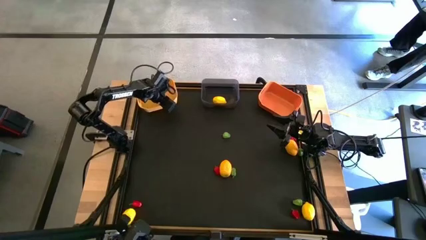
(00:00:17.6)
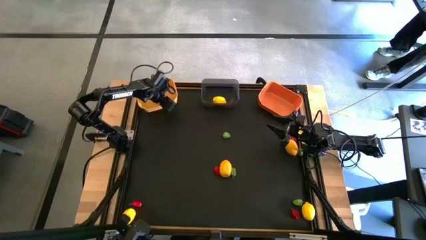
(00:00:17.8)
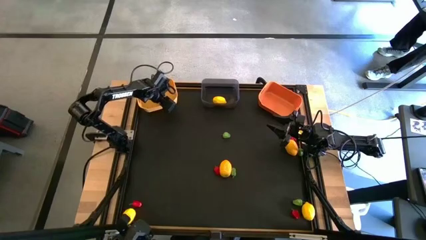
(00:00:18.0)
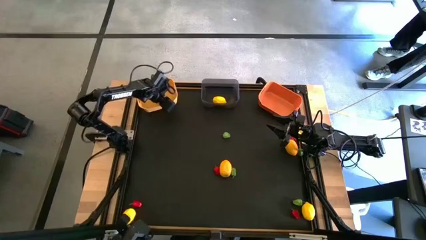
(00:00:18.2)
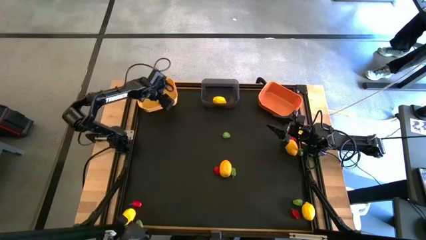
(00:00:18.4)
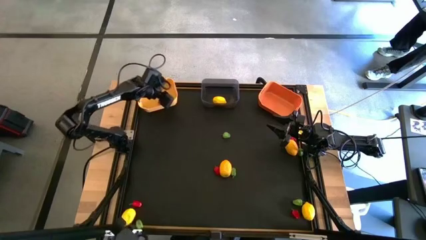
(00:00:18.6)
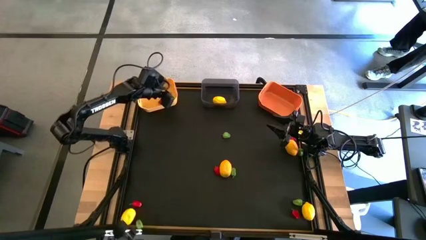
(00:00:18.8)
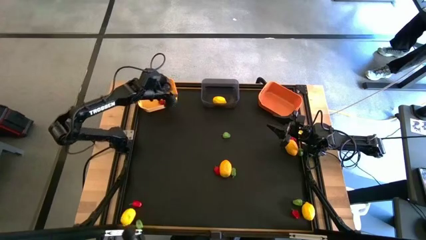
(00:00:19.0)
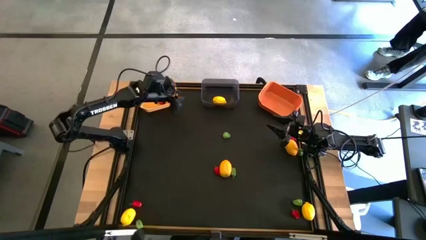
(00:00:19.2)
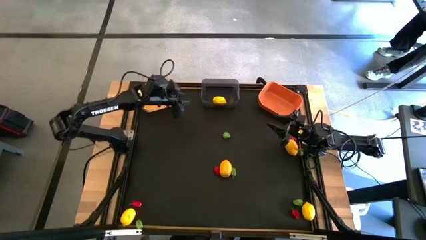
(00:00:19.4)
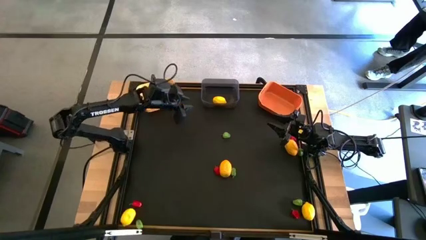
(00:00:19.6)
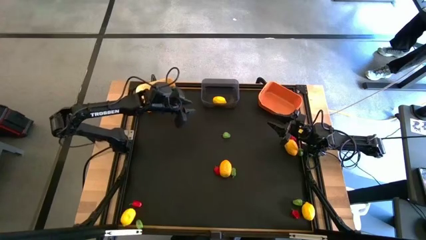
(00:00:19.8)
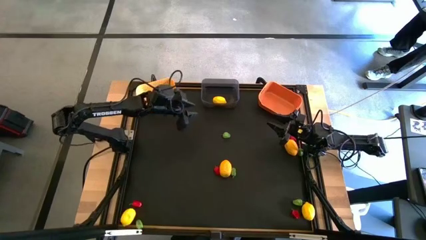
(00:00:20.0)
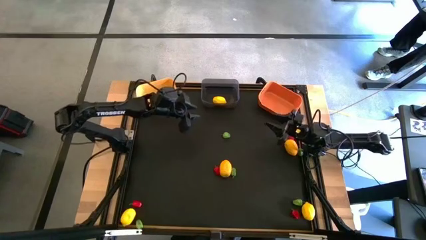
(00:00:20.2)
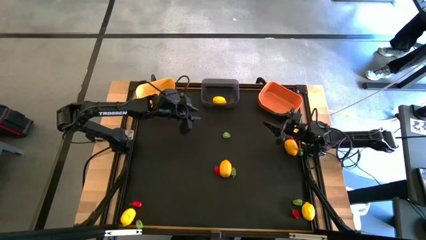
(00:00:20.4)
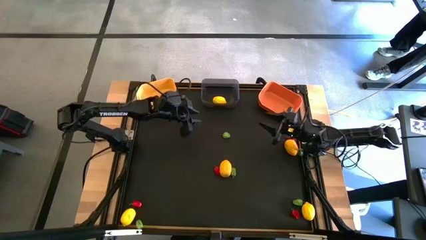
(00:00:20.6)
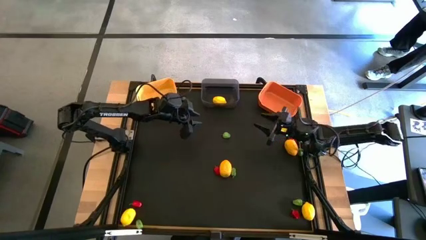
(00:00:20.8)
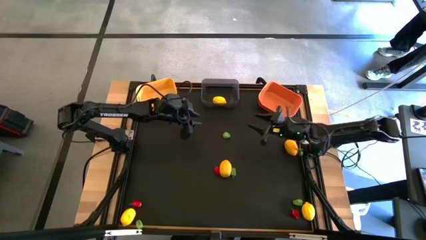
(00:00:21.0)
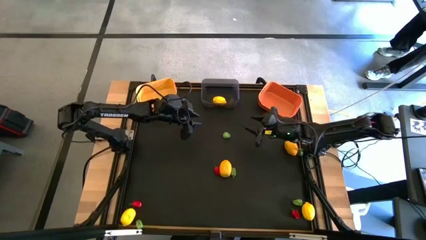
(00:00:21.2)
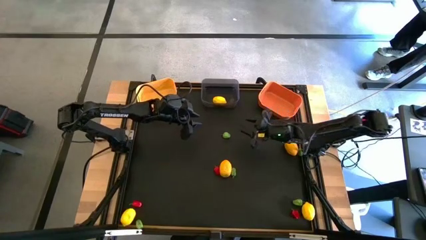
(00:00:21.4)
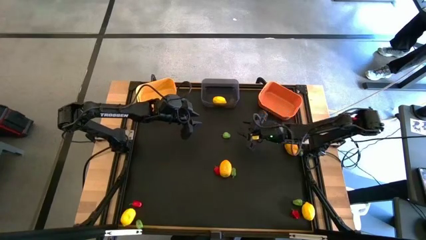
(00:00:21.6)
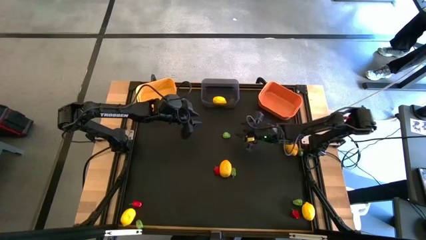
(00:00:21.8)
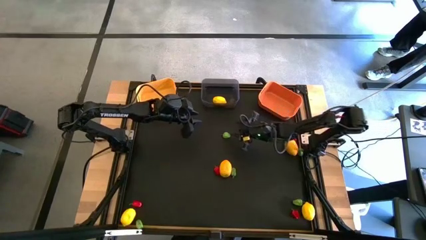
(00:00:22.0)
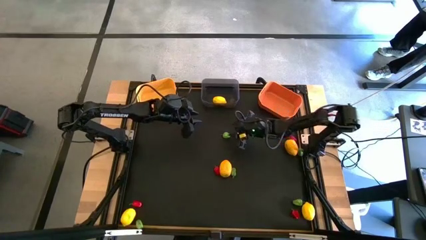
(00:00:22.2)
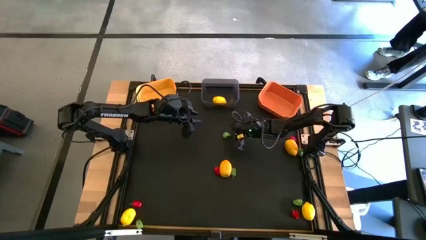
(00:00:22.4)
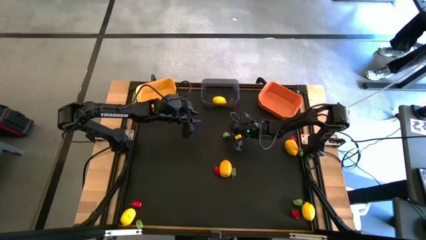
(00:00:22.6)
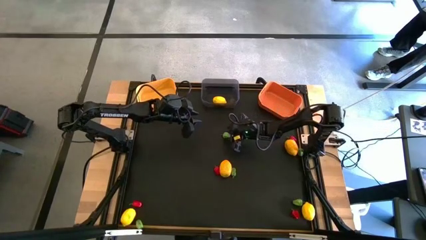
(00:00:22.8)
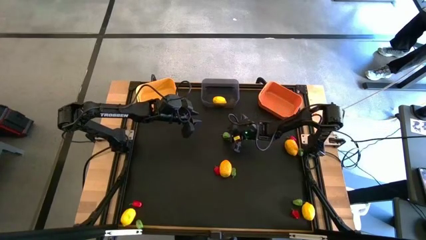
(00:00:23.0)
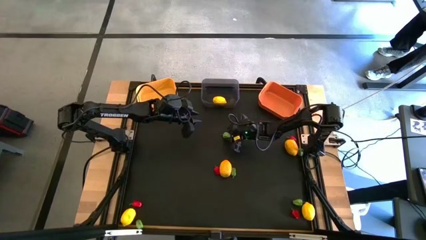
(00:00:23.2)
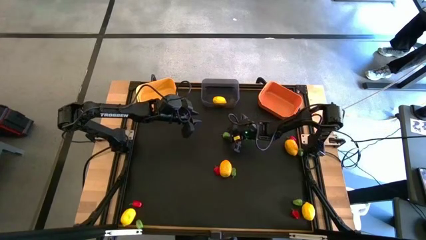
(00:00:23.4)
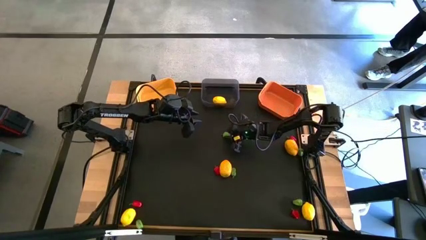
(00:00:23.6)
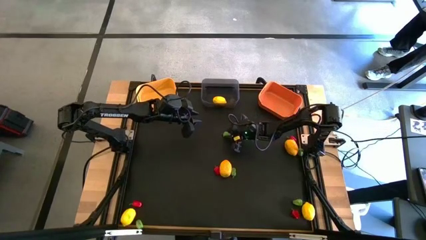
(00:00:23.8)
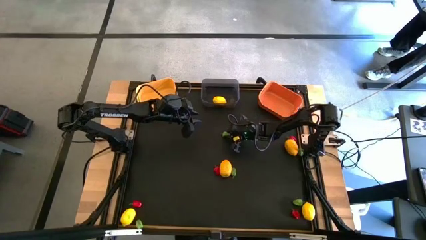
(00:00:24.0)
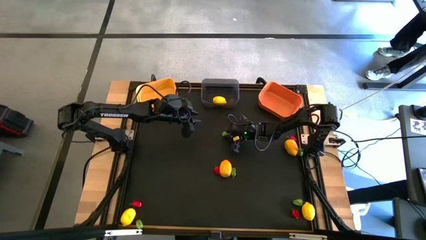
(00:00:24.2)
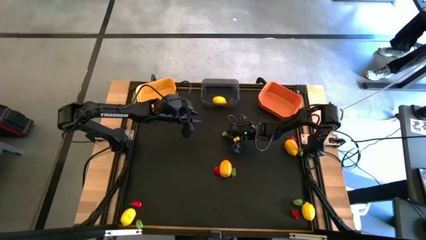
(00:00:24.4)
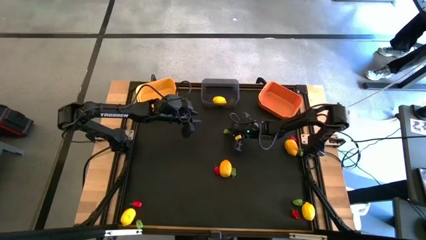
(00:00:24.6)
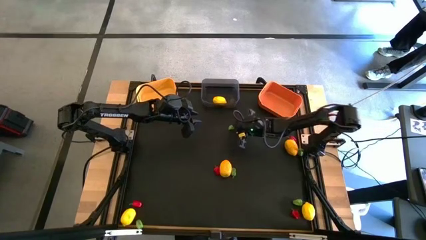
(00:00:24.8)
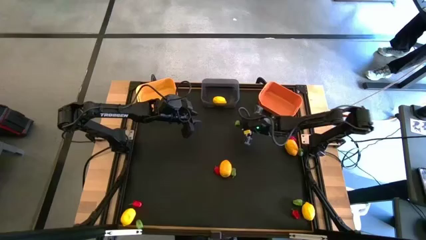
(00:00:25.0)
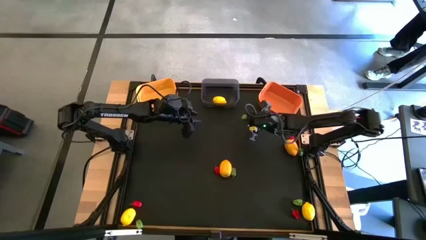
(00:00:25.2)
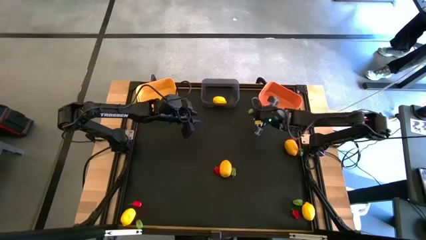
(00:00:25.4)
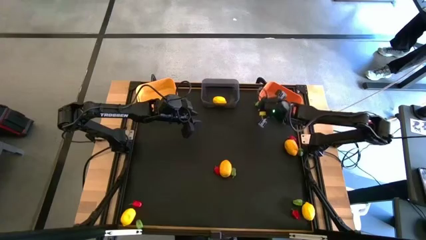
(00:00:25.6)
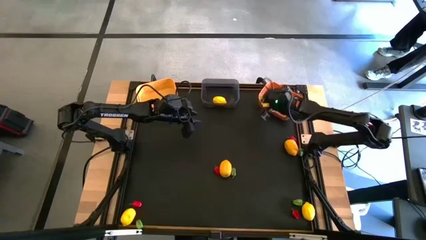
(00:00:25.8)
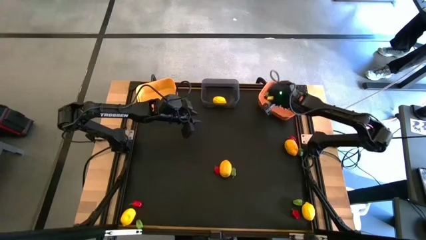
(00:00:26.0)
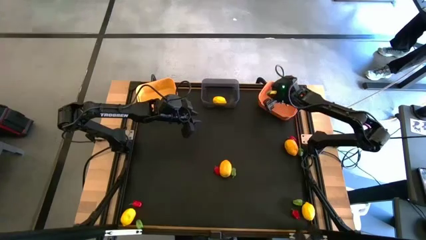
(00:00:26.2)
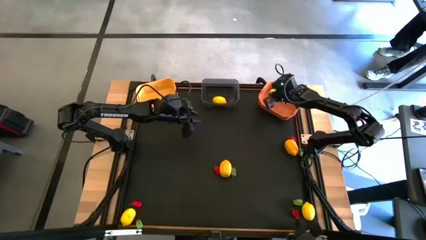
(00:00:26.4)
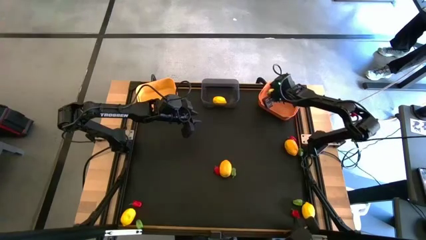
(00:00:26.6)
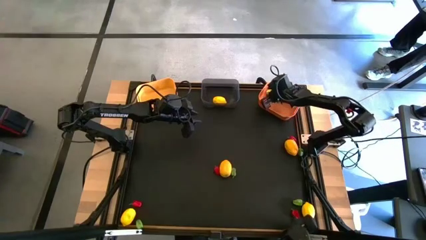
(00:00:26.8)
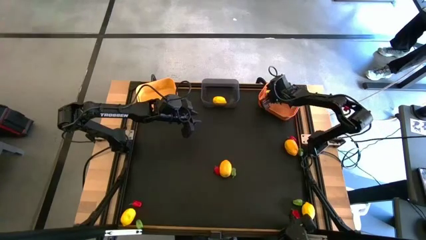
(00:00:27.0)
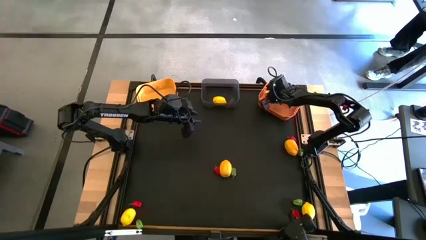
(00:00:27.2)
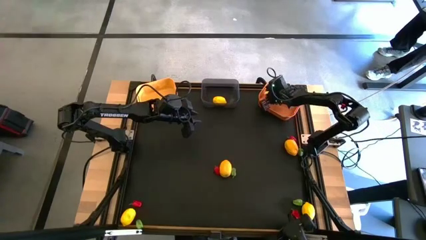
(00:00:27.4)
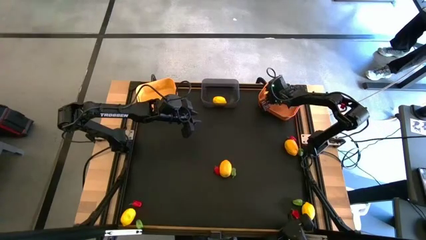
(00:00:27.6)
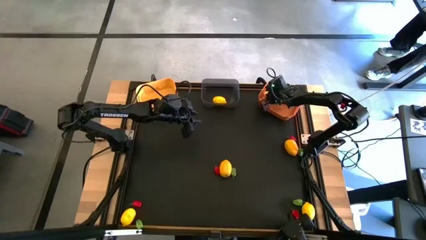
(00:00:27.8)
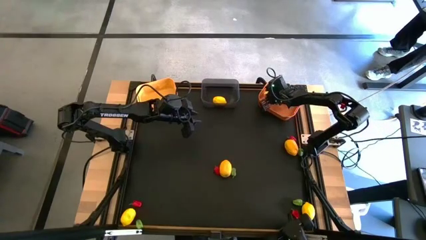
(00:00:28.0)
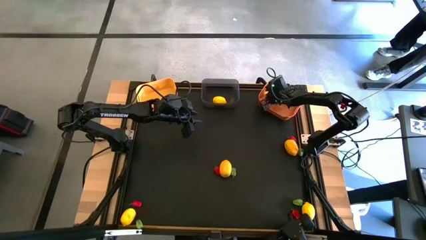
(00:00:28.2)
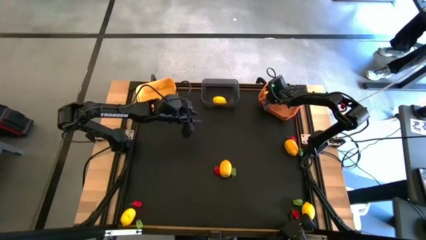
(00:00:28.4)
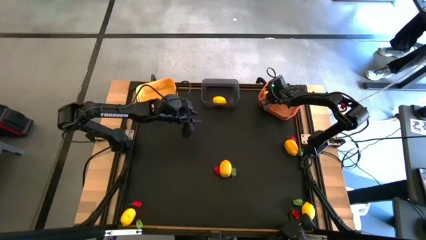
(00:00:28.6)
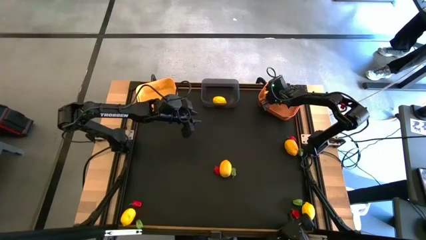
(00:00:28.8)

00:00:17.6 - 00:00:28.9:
Task: Sort produce into baskets
Put the green chili pepper into the orange bin
